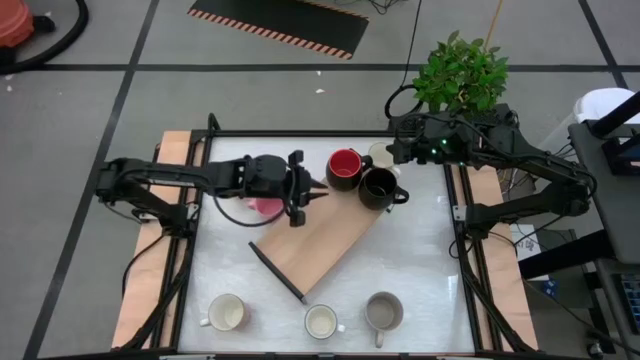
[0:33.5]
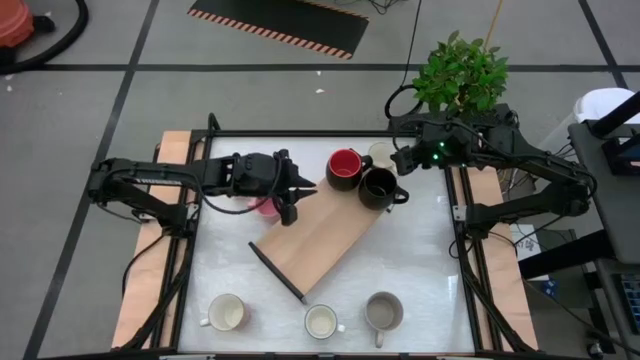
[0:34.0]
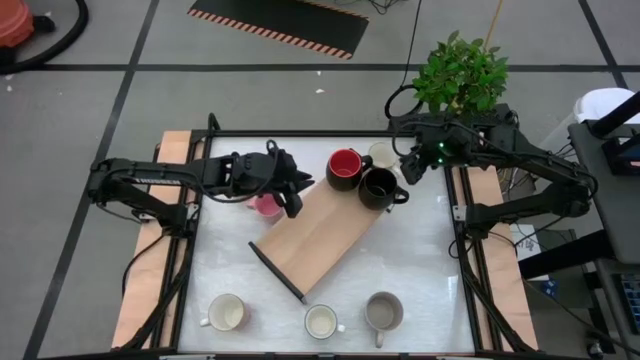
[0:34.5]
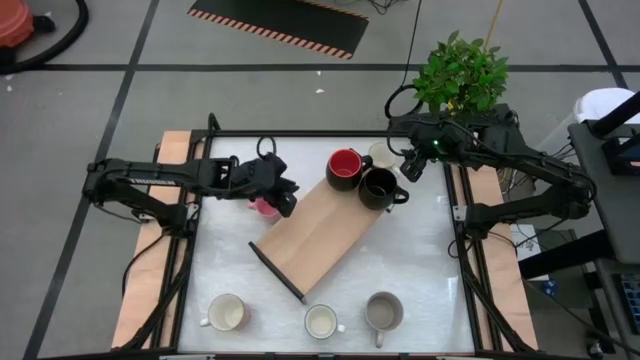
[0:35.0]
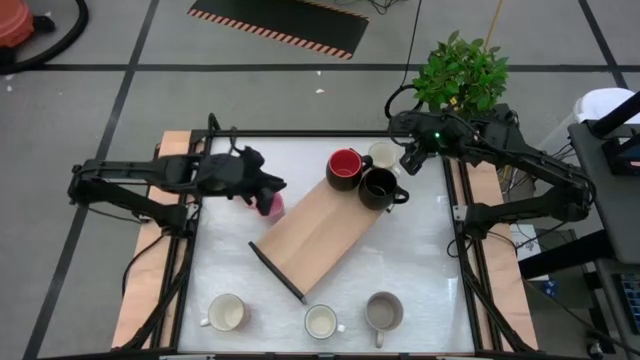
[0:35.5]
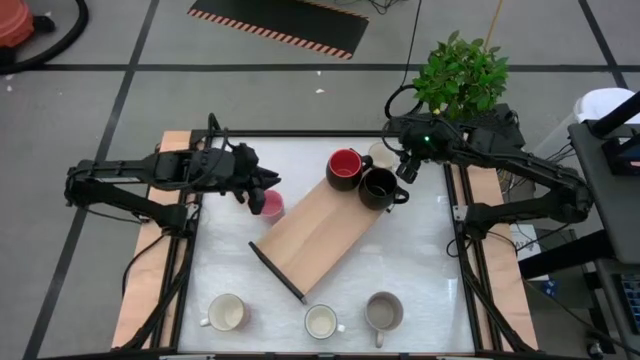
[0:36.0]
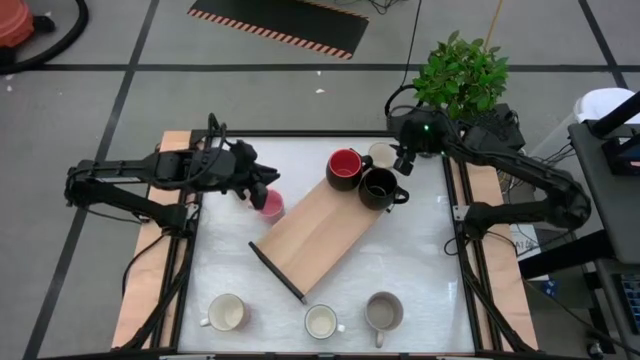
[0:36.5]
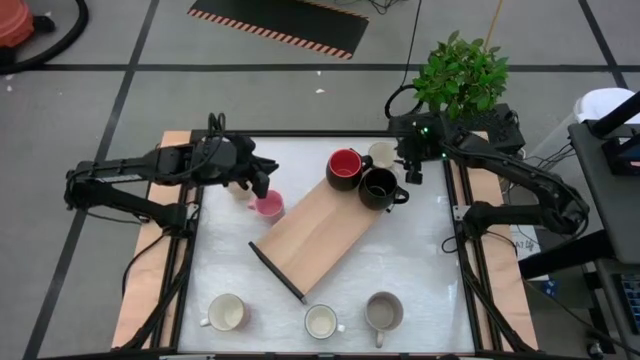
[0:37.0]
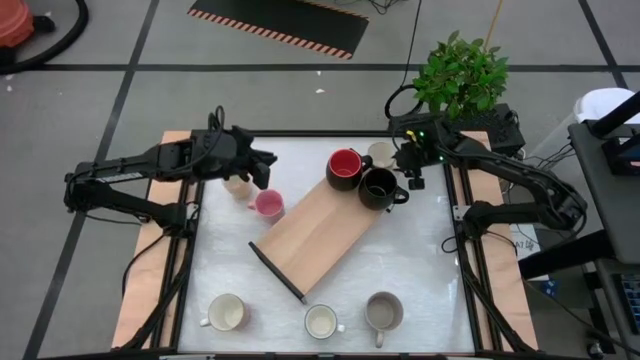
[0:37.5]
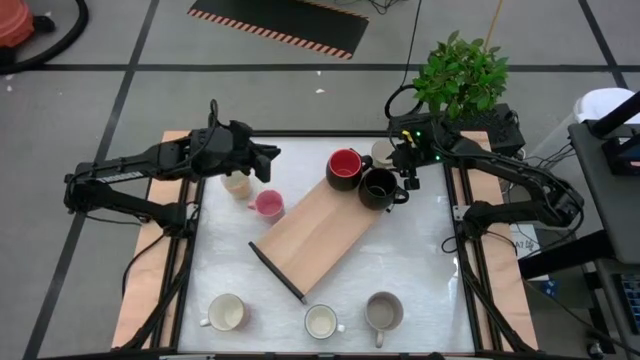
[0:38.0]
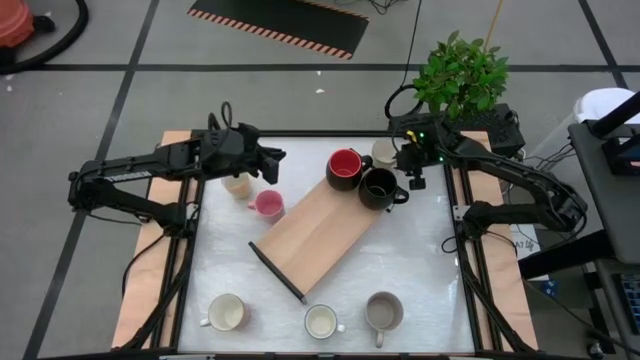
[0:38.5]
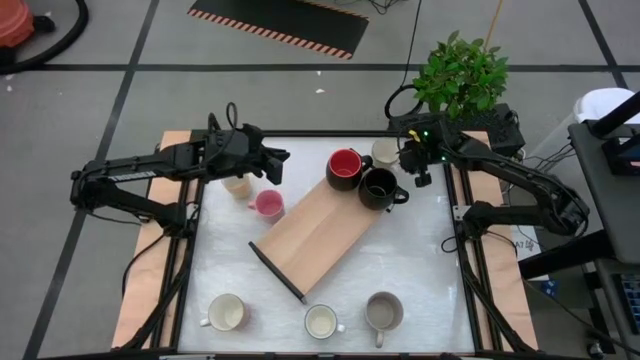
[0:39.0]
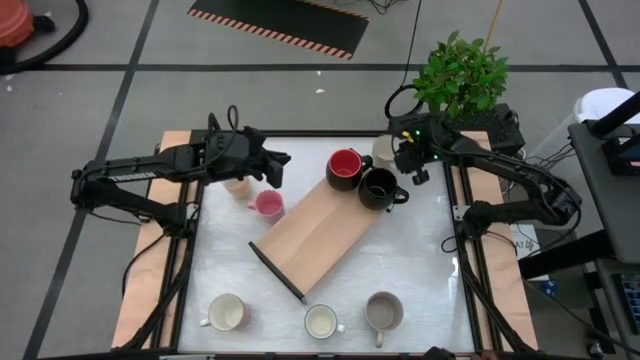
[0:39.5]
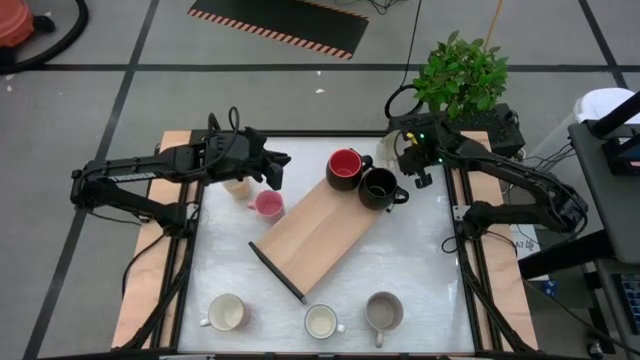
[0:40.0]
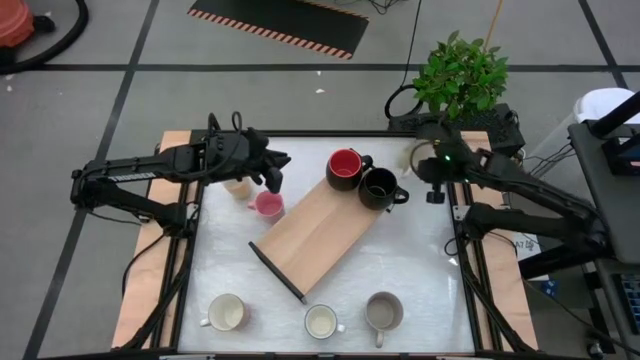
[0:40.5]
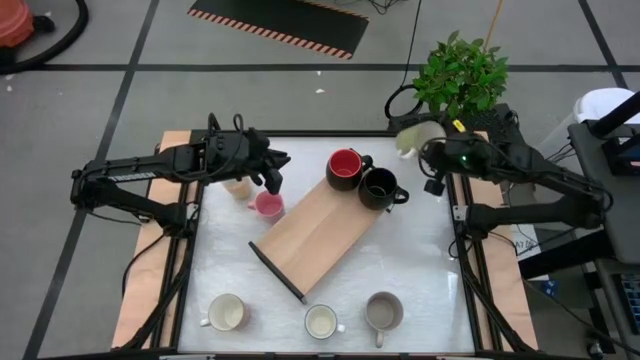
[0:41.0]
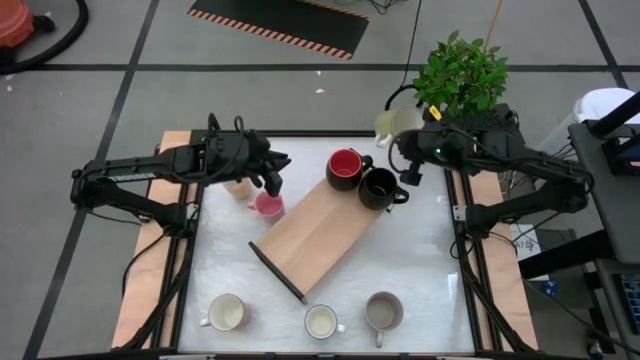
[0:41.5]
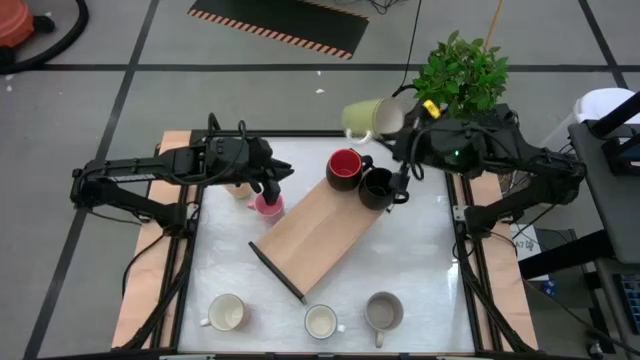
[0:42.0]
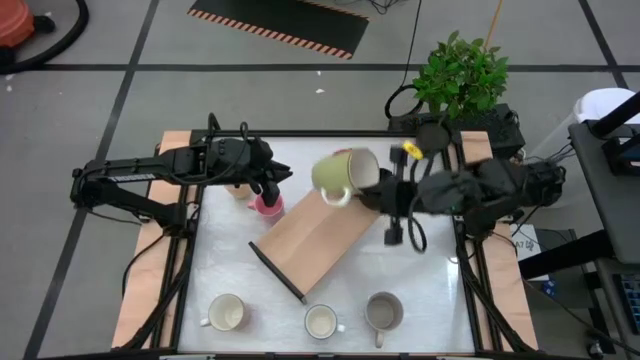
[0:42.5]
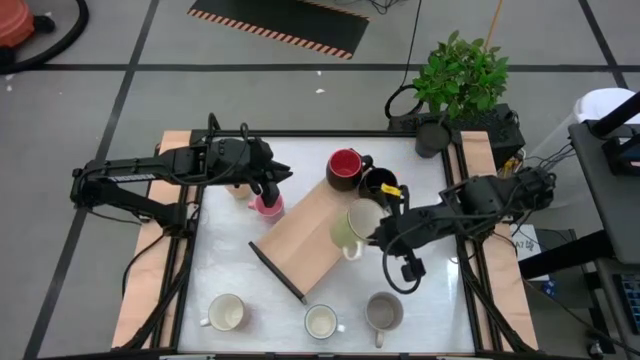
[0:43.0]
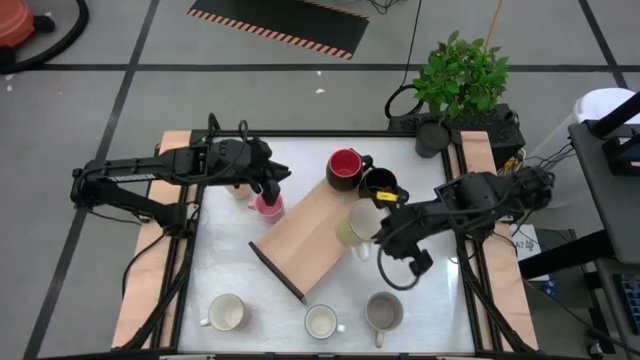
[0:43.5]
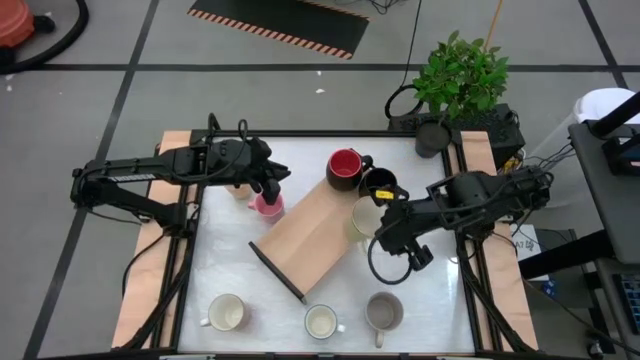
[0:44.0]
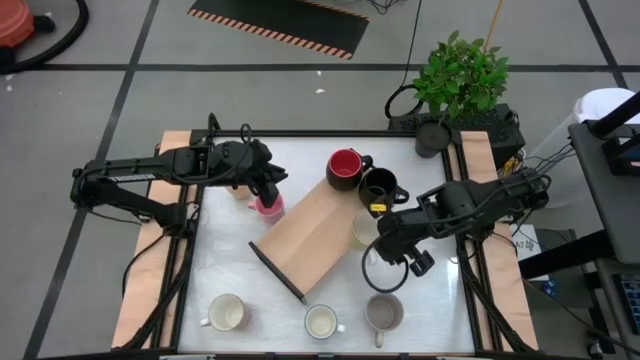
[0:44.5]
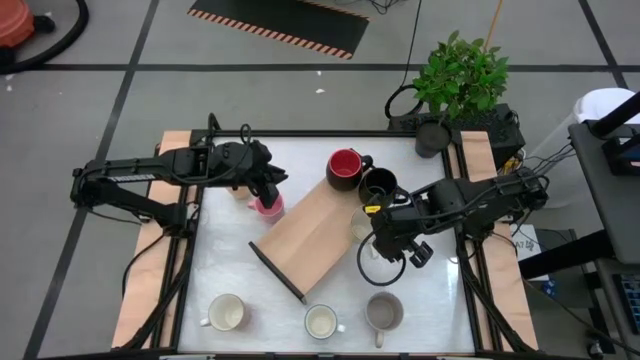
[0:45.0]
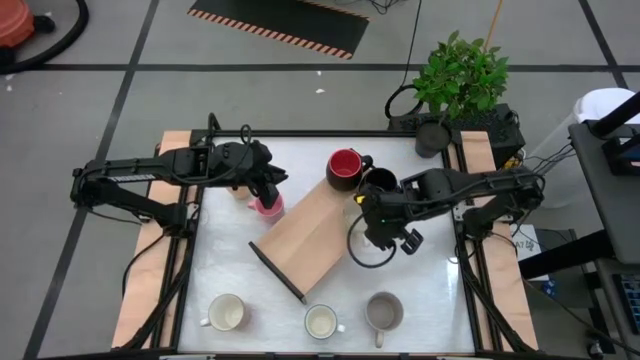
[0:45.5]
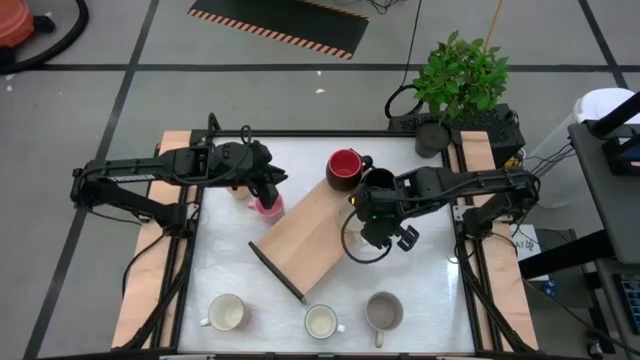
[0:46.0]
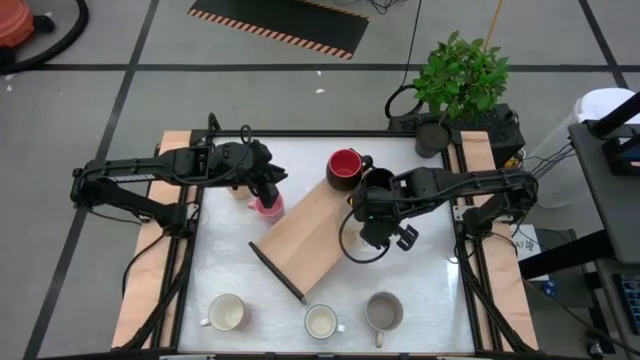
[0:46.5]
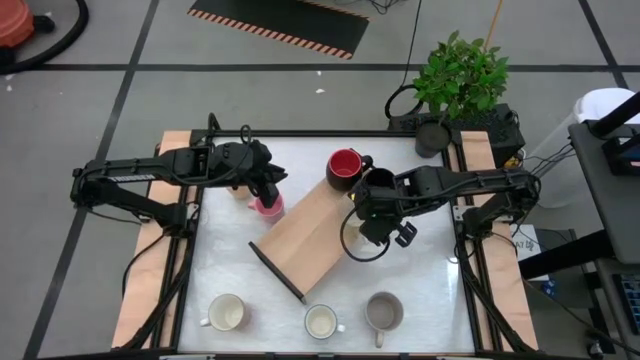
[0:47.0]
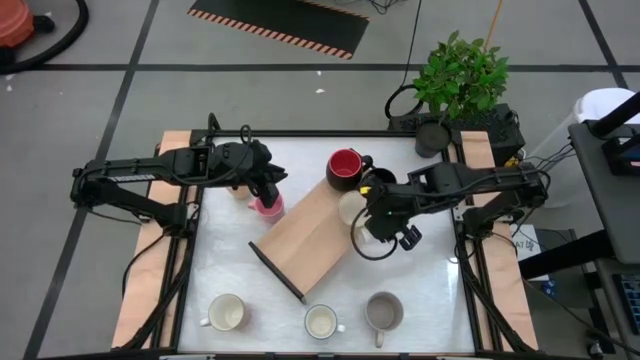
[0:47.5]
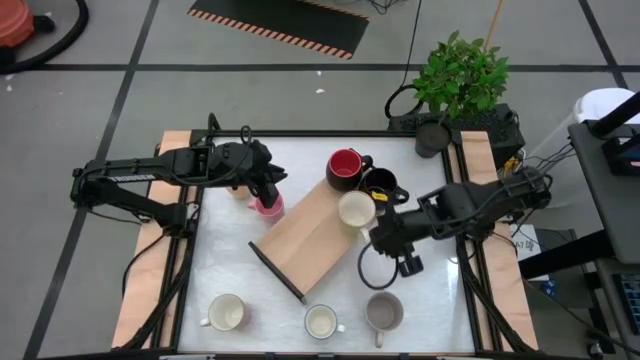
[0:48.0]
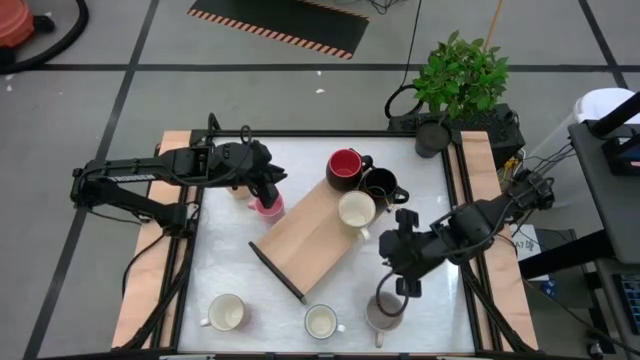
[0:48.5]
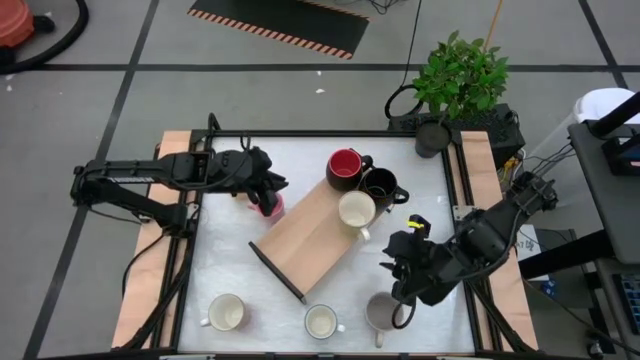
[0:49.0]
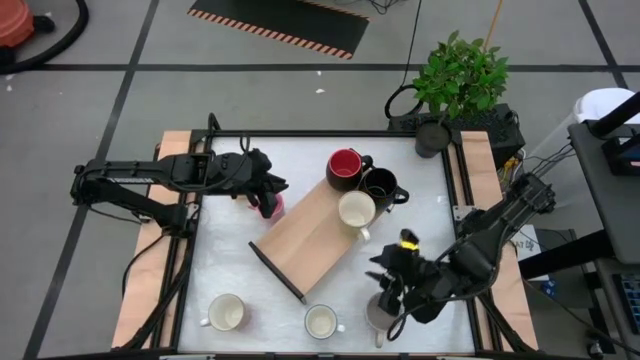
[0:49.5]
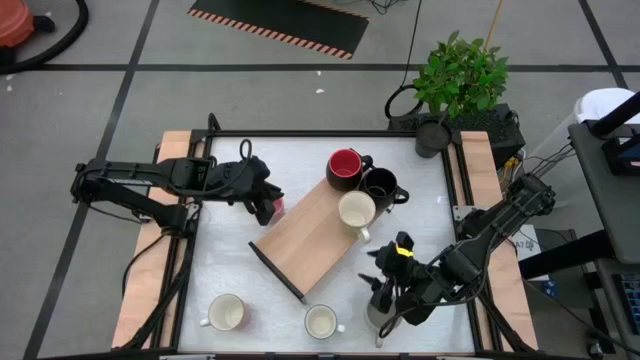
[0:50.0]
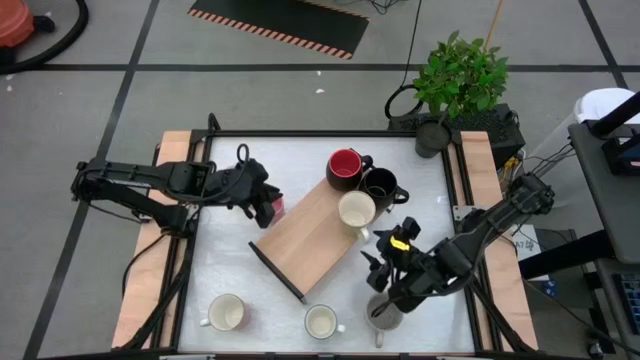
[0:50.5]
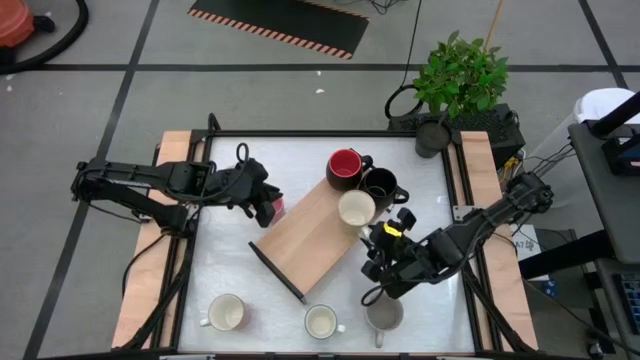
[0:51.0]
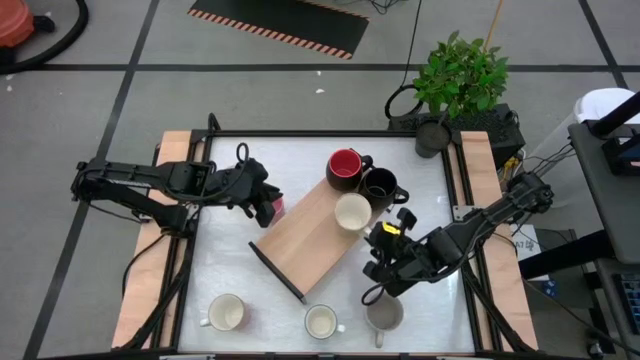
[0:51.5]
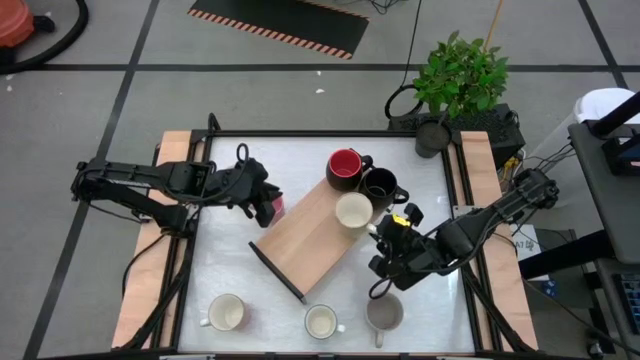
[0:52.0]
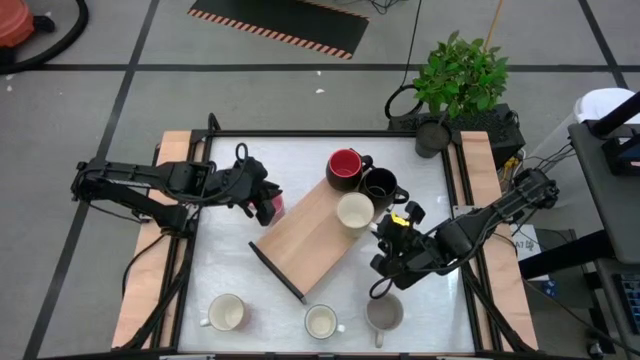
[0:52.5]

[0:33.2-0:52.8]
Task: Place coffee mugs
Put the white mug on top of the shelf
